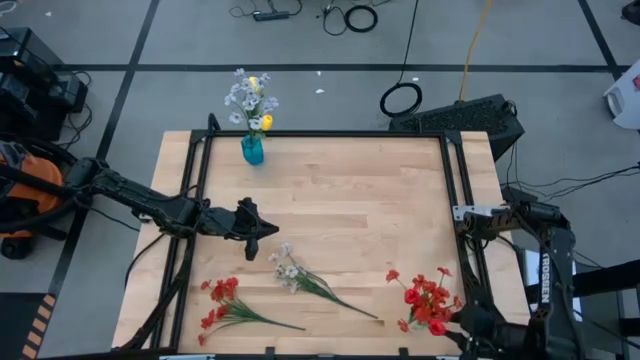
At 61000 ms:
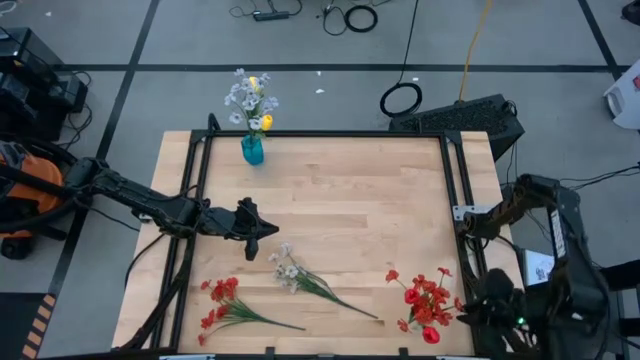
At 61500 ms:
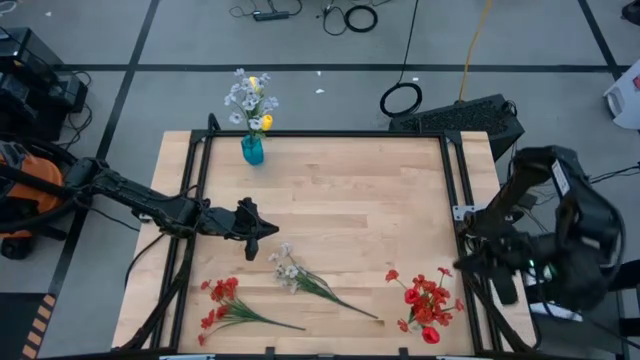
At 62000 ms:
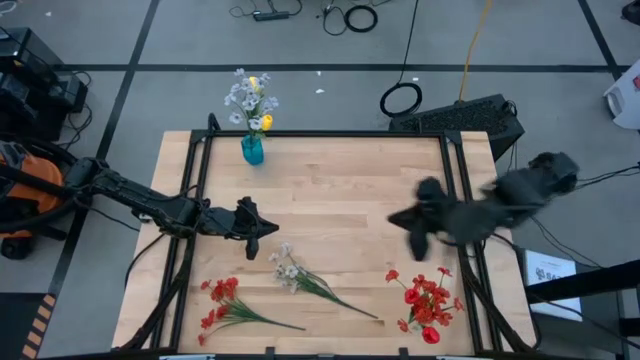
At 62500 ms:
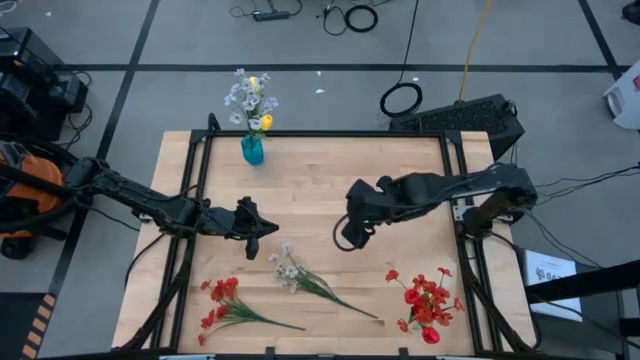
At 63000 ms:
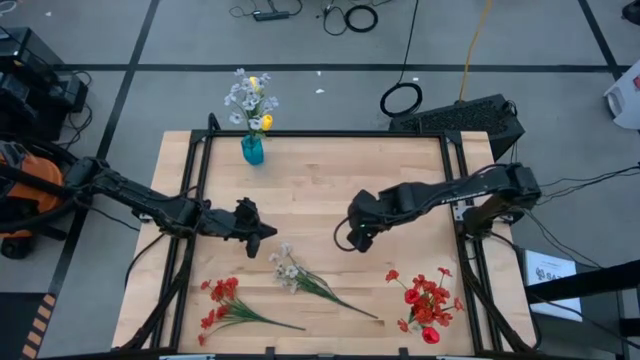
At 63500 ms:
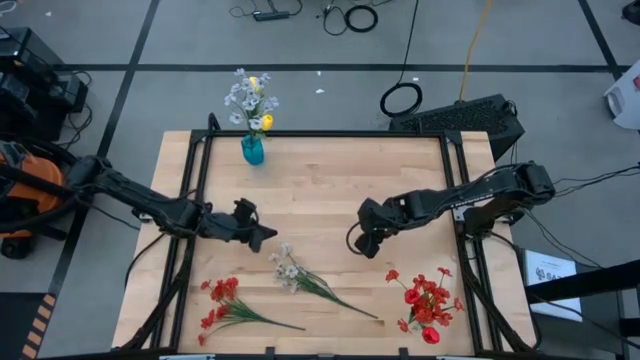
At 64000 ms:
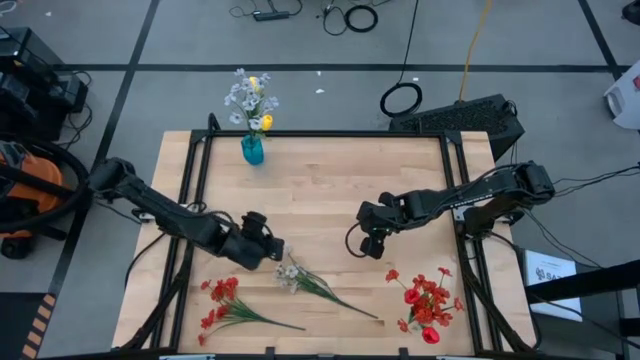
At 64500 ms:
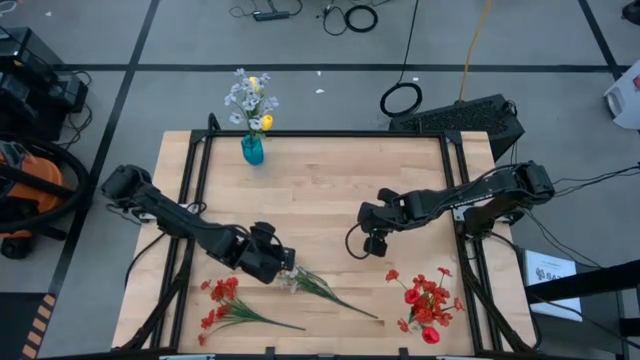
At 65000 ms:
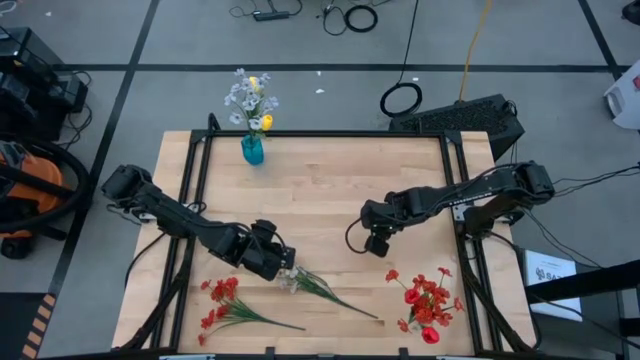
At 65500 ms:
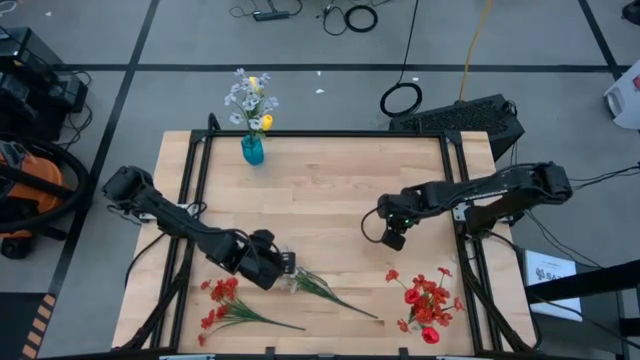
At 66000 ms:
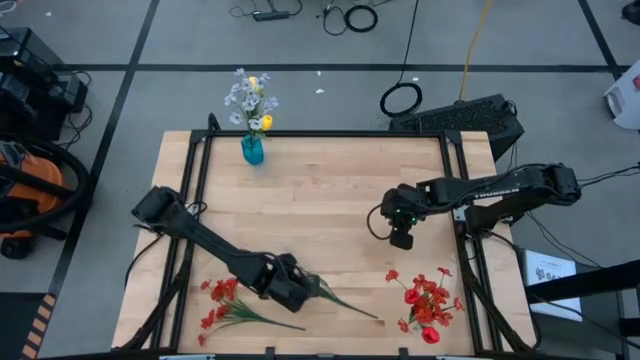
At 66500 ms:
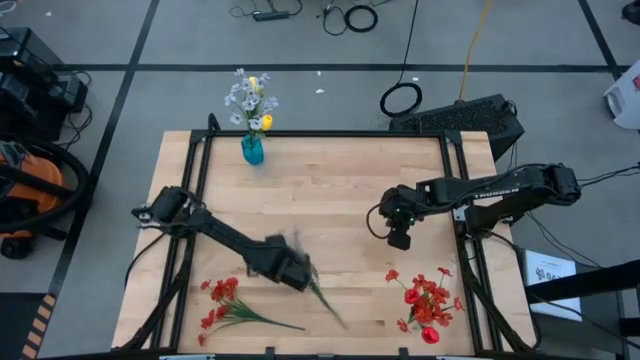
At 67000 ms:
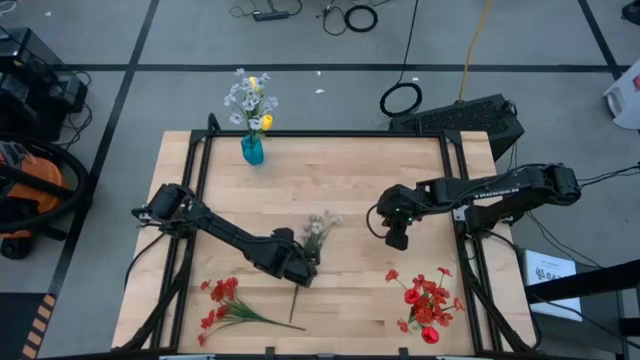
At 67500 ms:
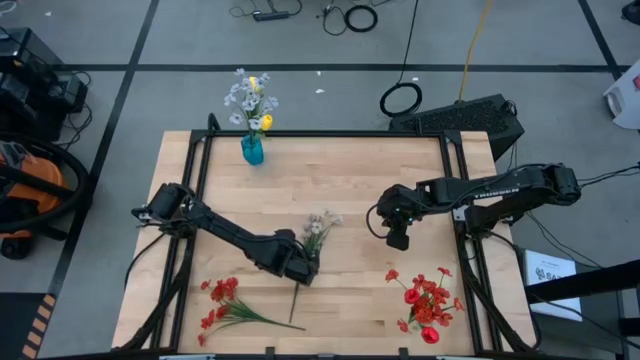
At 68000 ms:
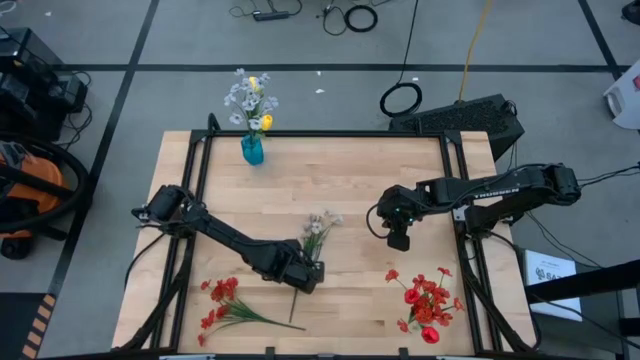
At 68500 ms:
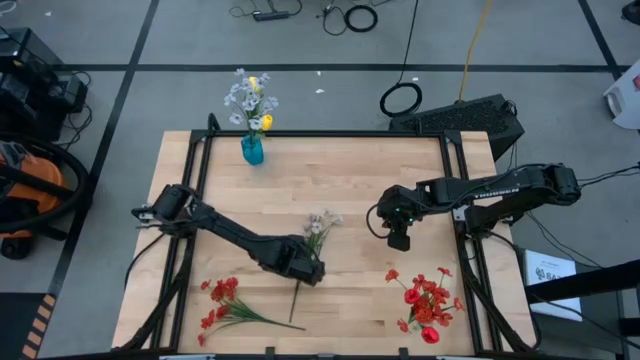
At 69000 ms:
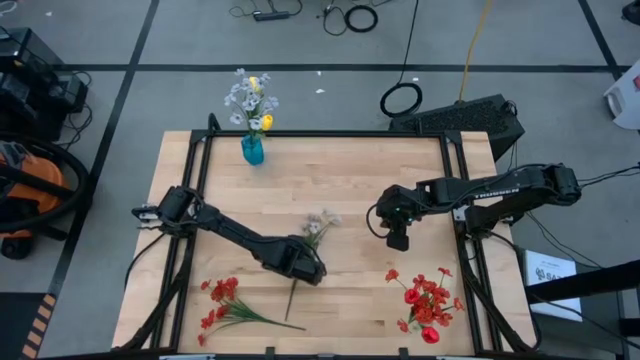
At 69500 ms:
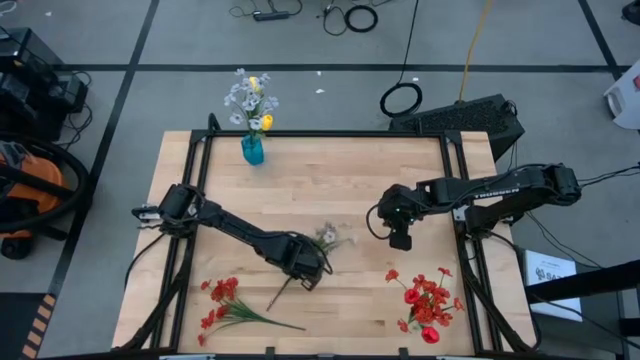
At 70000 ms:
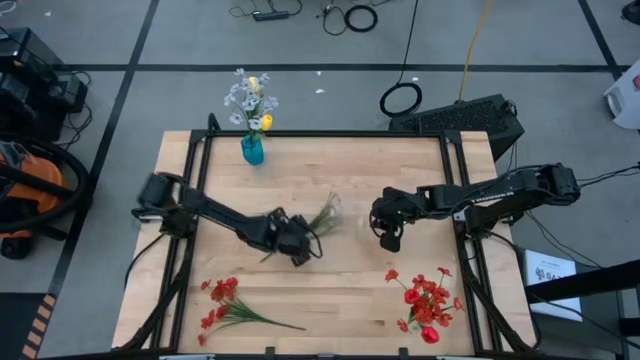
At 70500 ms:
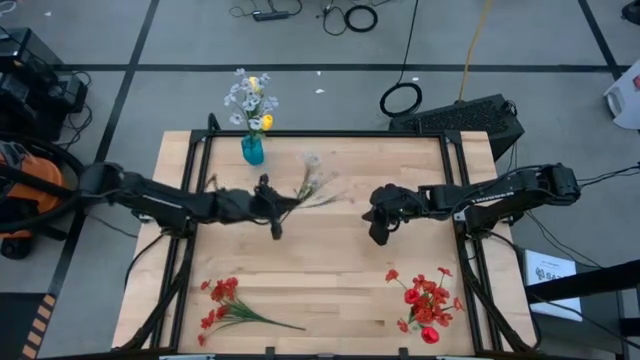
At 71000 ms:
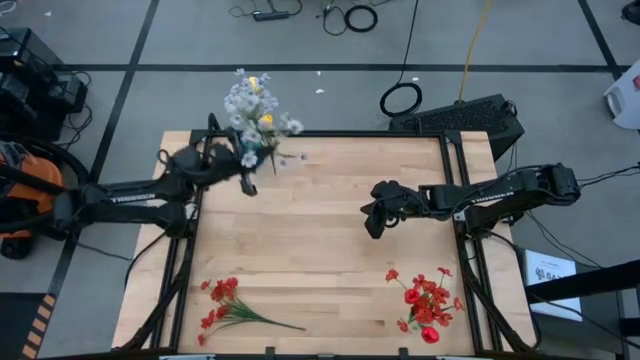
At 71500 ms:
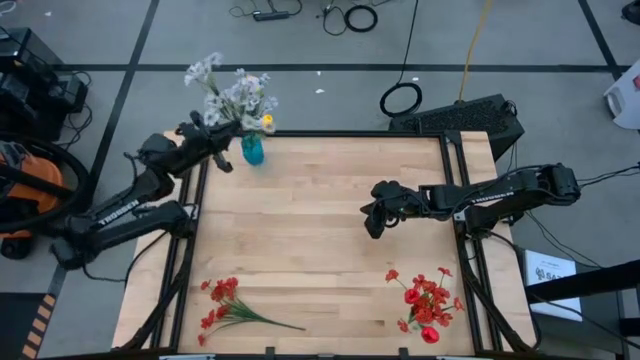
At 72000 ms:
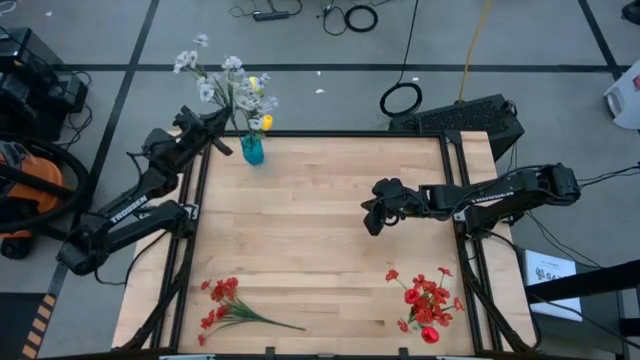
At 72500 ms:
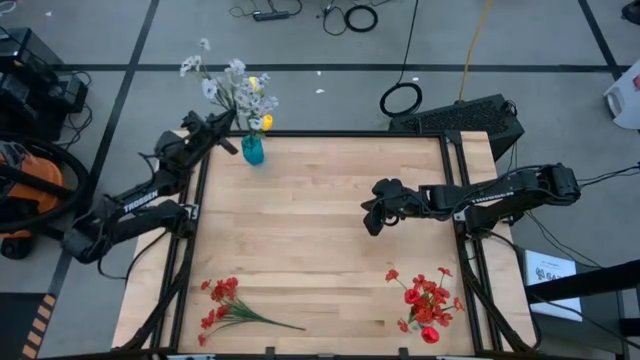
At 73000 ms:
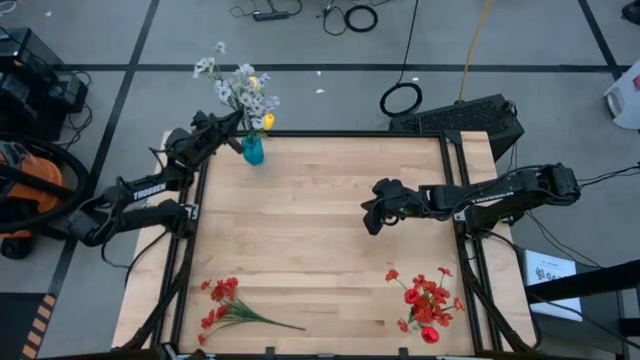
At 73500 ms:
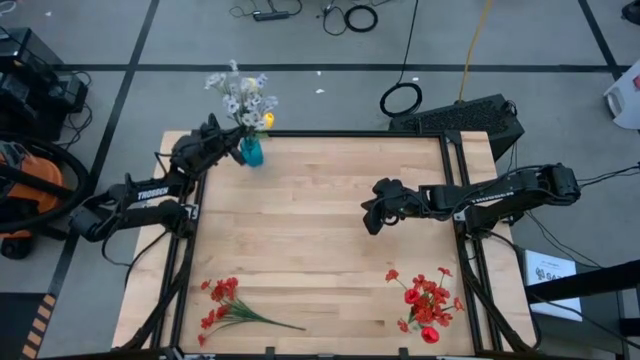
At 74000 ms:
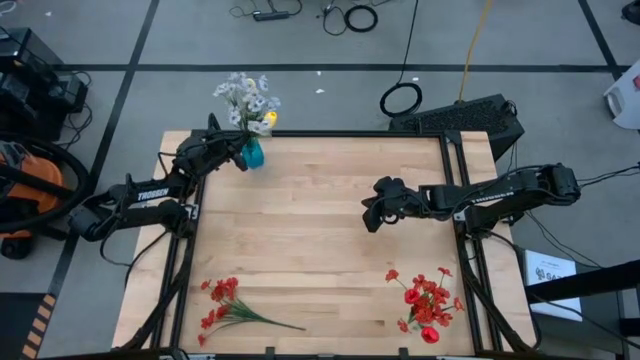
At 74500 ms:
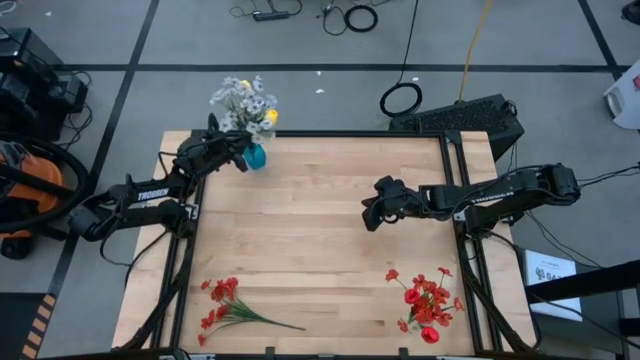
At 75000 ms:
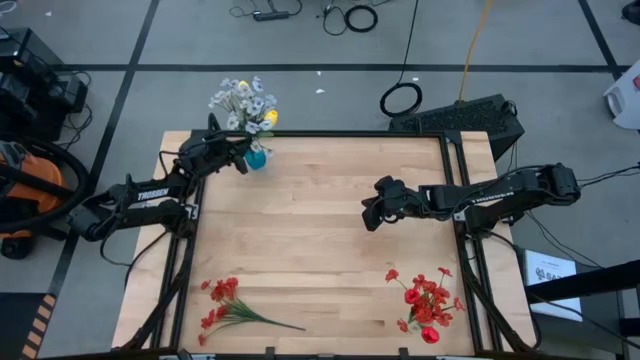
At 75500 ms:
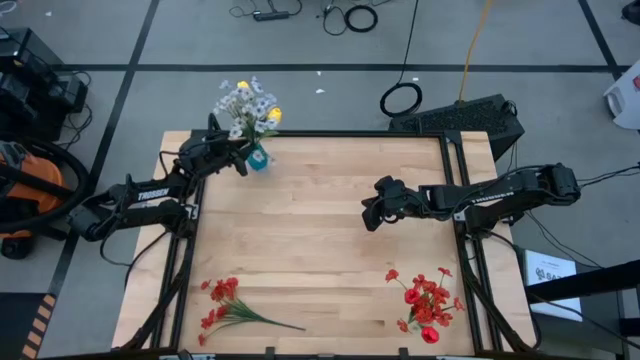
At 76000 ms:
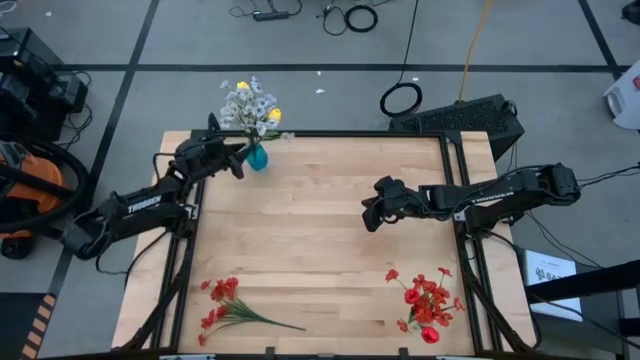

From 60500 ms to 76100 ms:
Task: Sort flowers into vase by color
Put the white flowers into the blue vase

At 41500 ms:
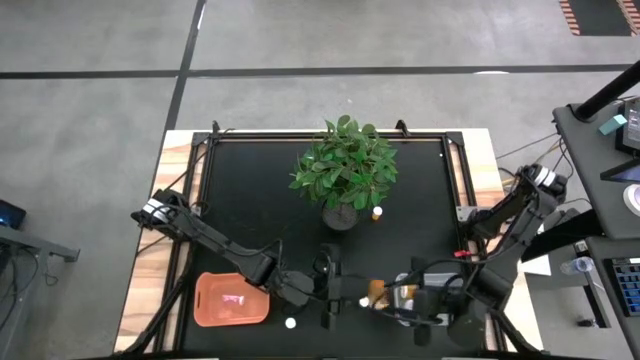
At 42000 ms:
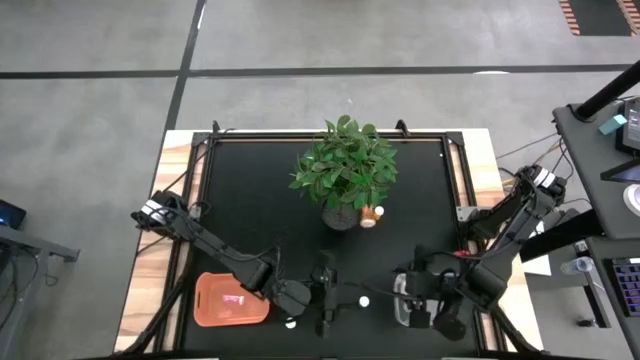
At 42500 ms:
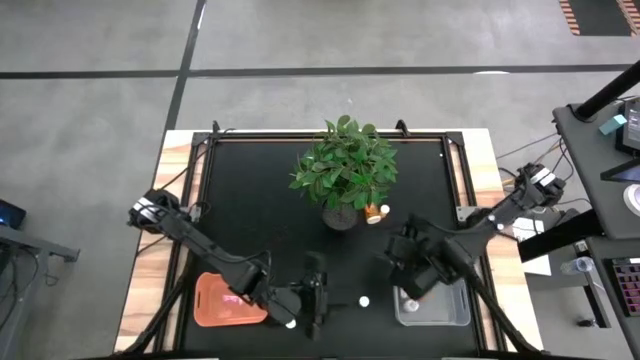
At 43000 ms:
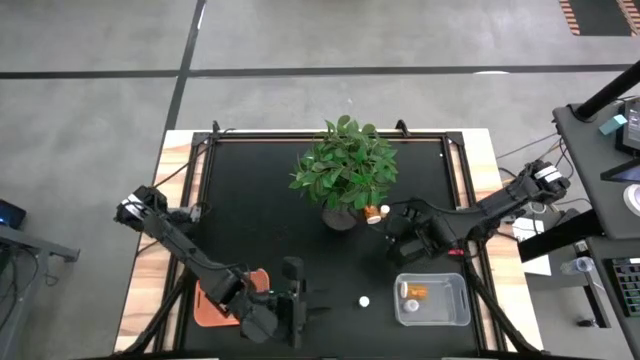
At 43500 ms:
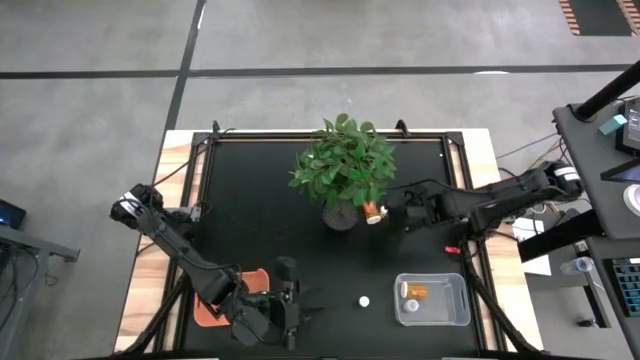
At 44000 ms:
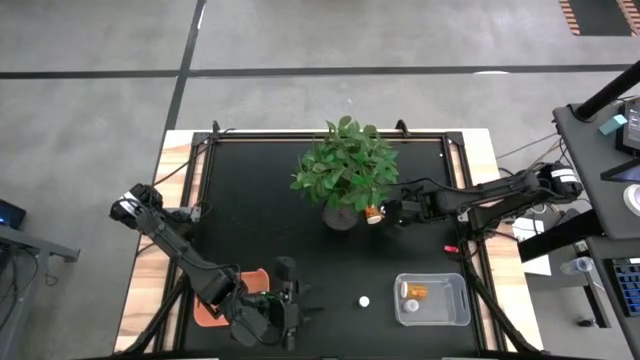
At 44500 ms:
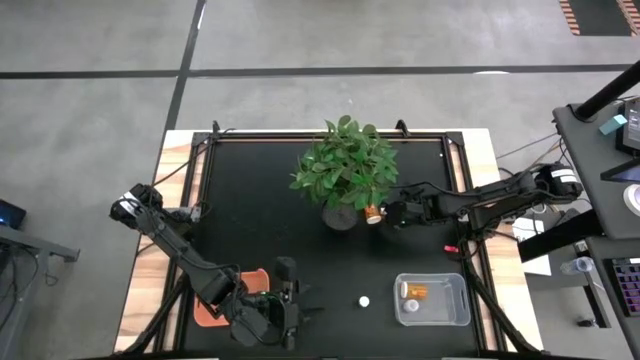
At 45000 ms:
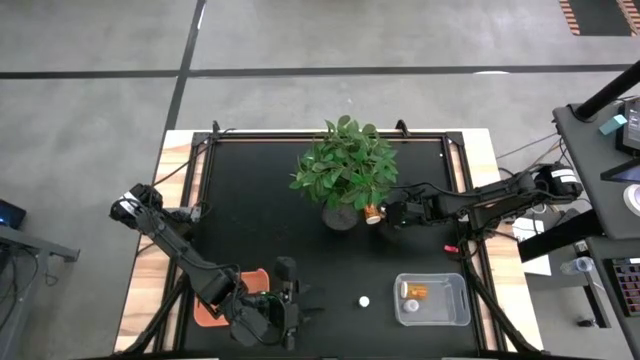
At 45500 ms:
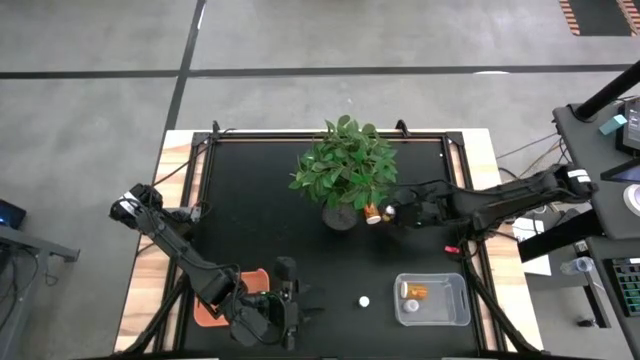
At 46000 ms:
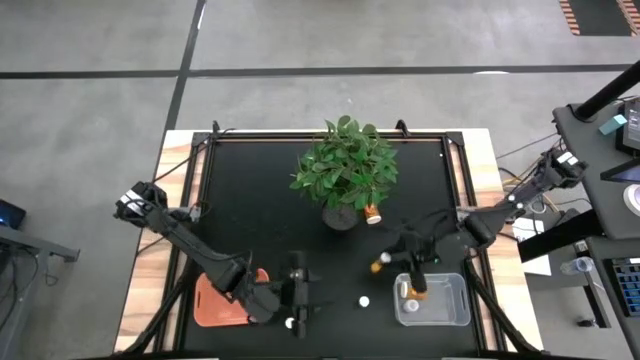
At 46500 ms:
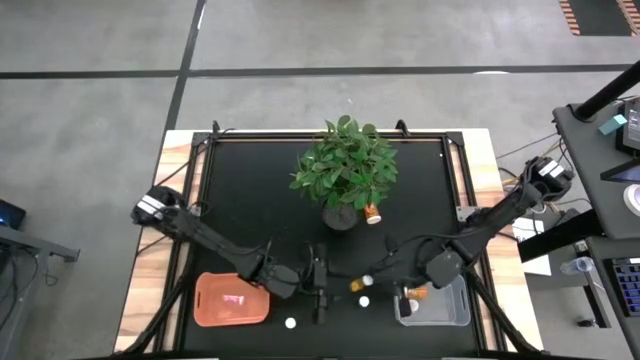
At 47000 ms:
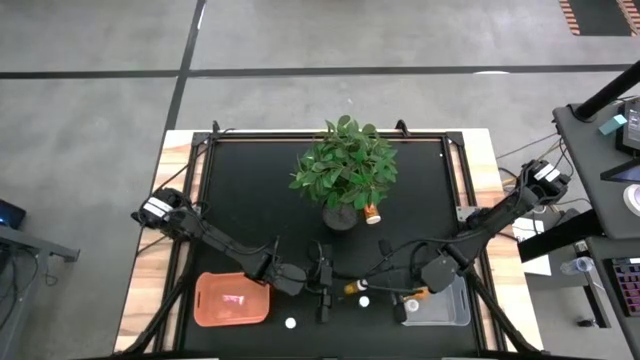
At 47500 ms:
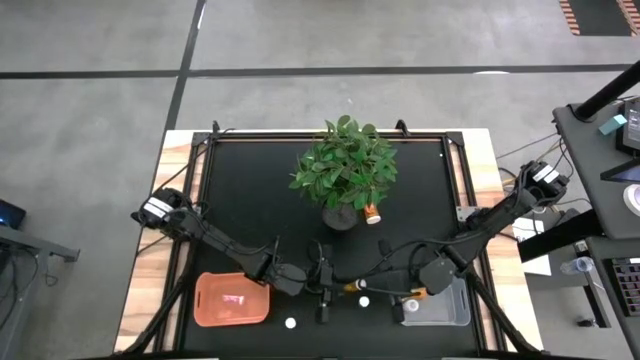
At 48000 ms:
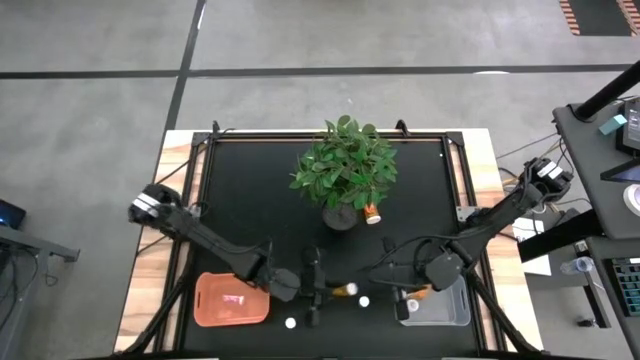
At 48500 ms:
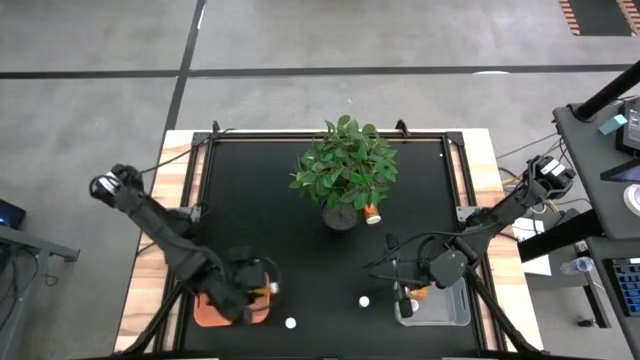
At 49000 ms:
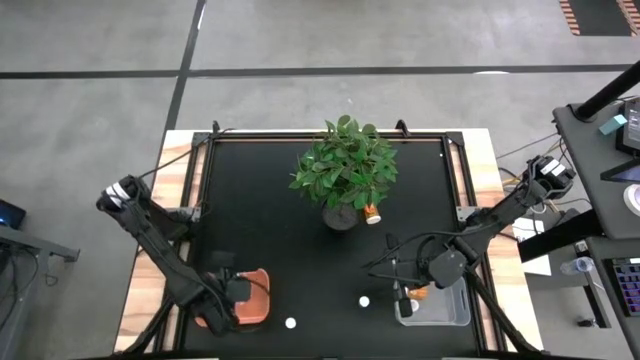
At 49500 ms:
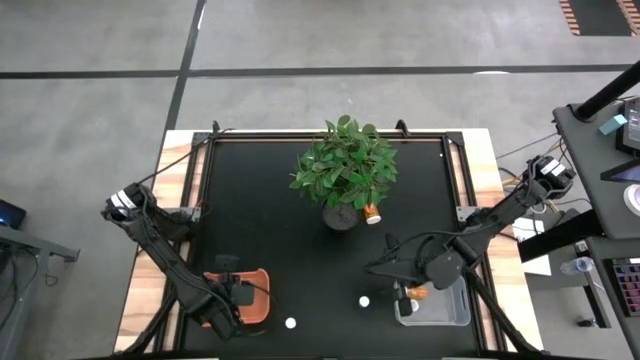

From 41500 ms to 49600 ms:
Task: Pick and place medicine bottles into bin by pill shape (circle, oval)
Put the orange tablet bottle into the orange bin
